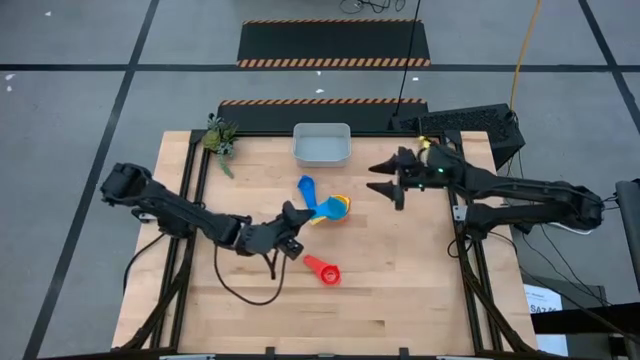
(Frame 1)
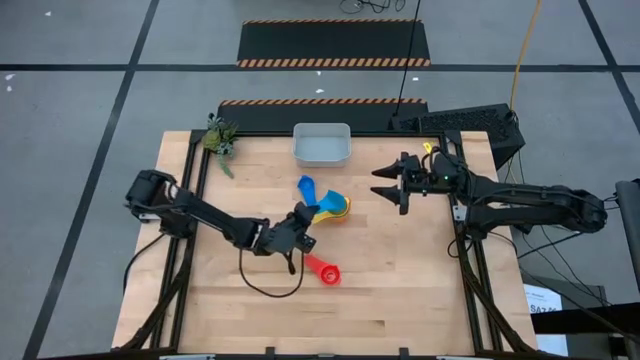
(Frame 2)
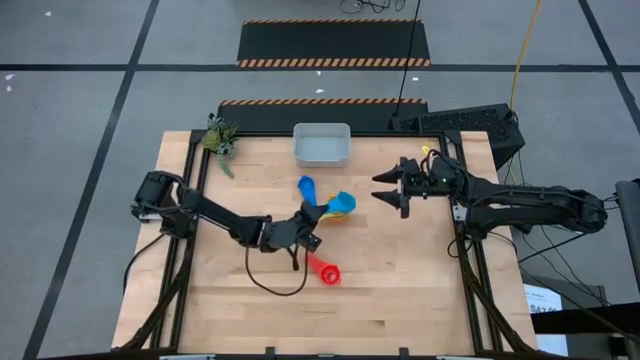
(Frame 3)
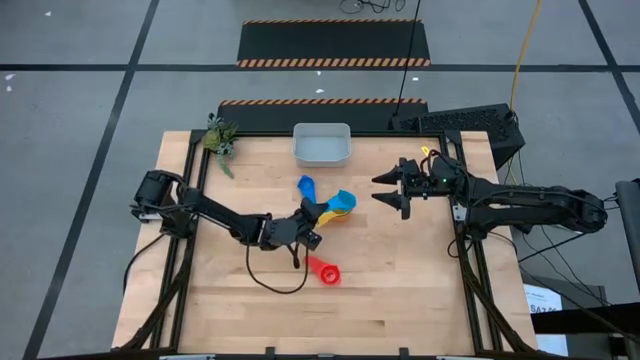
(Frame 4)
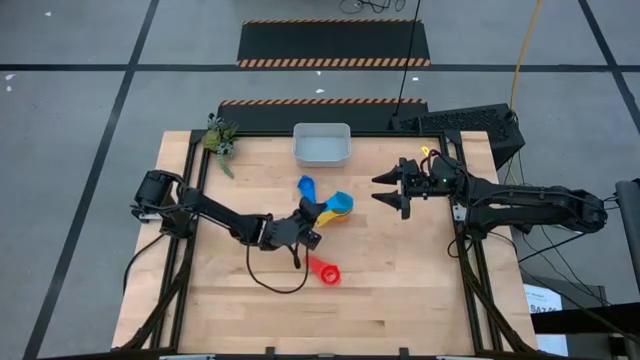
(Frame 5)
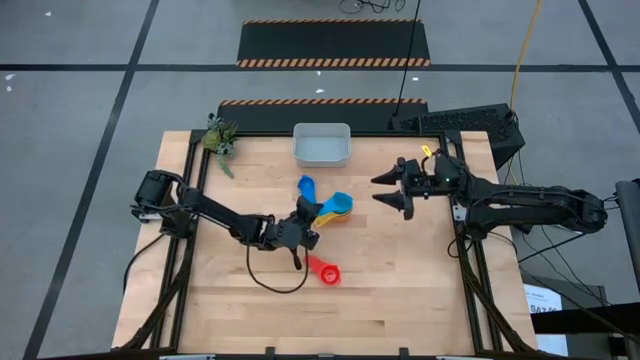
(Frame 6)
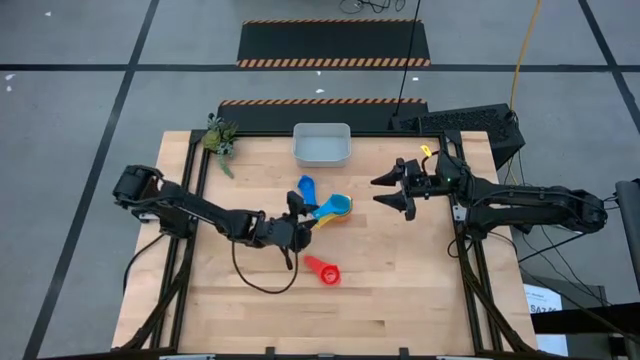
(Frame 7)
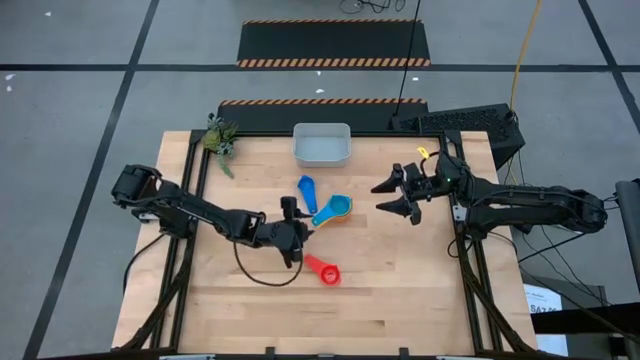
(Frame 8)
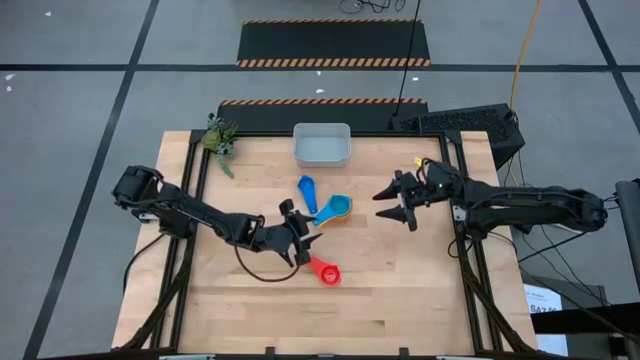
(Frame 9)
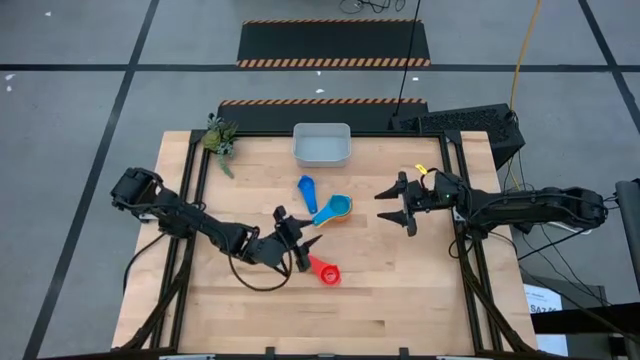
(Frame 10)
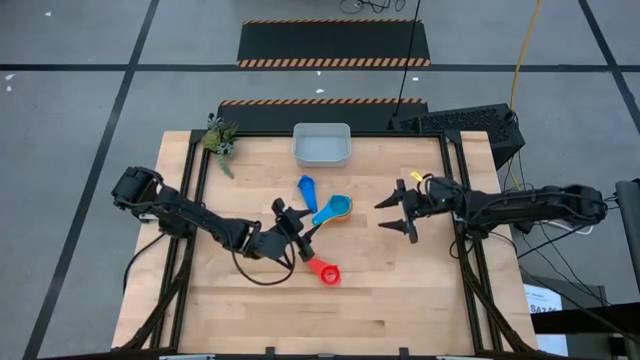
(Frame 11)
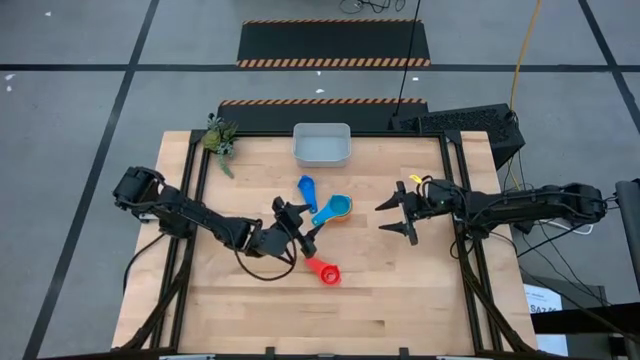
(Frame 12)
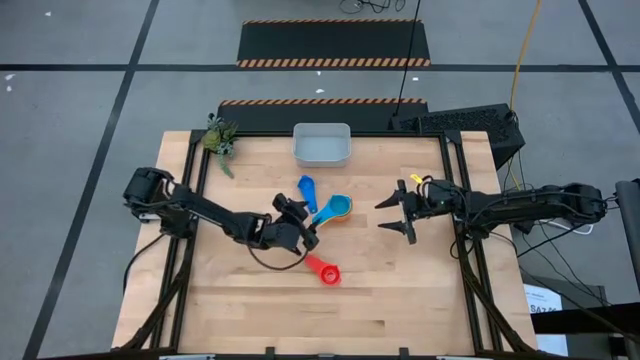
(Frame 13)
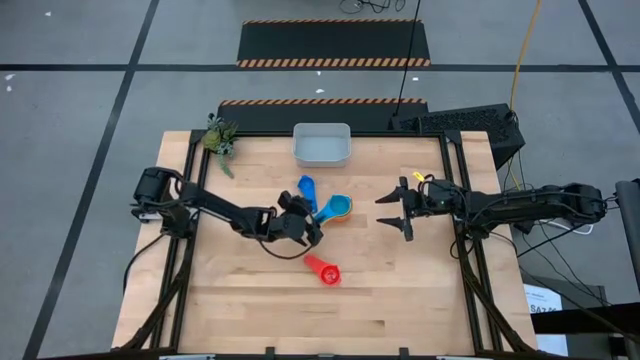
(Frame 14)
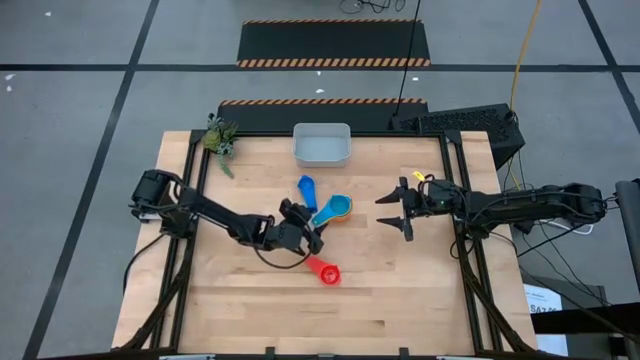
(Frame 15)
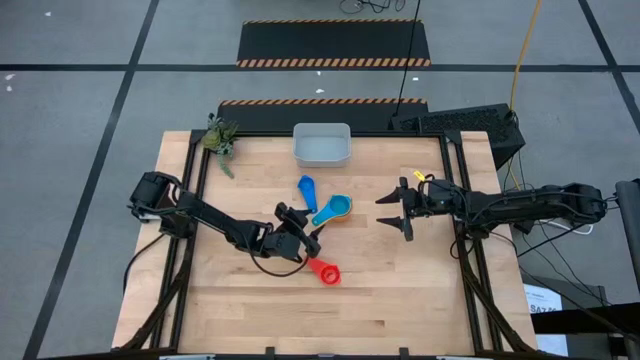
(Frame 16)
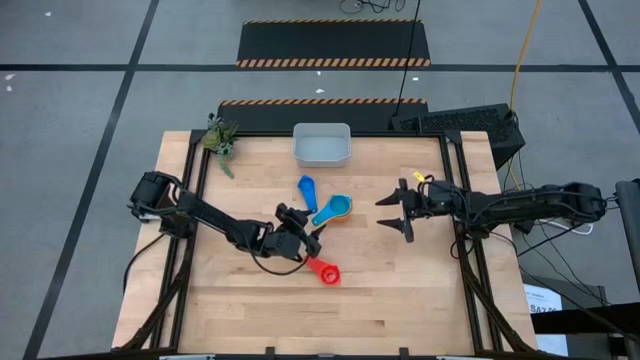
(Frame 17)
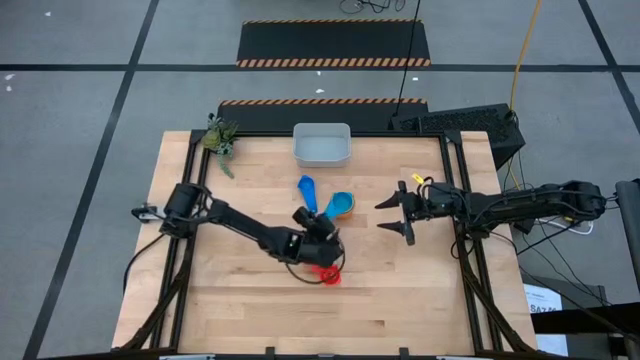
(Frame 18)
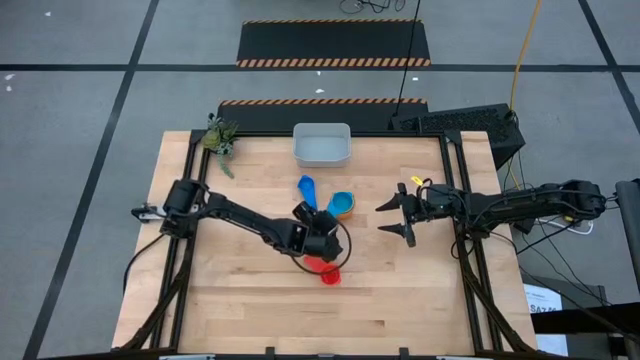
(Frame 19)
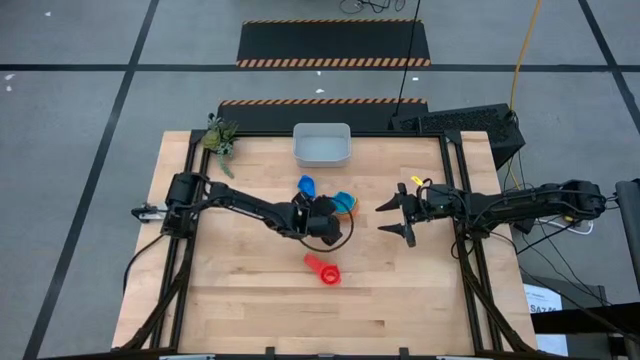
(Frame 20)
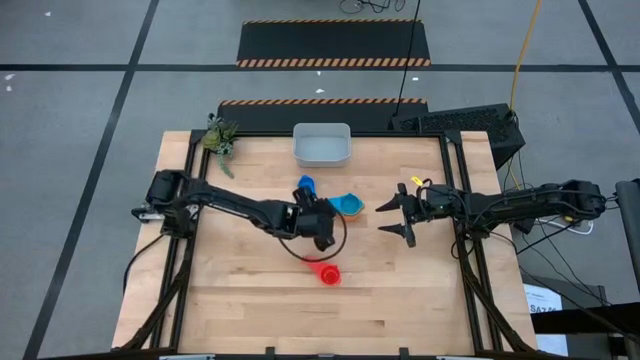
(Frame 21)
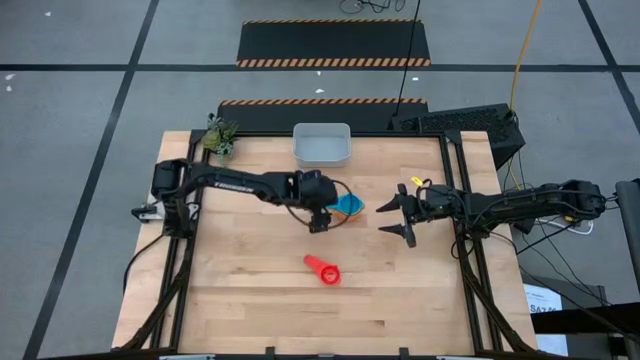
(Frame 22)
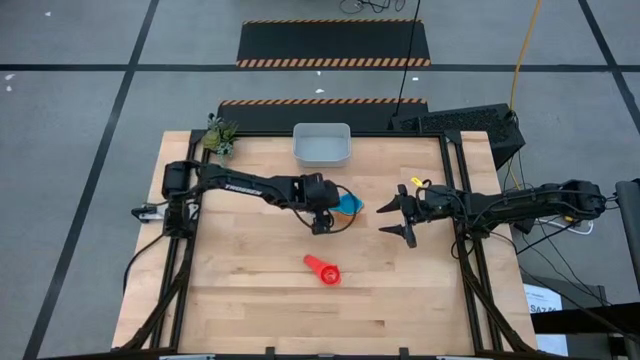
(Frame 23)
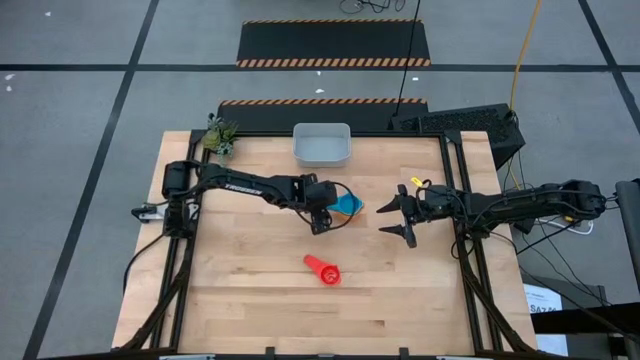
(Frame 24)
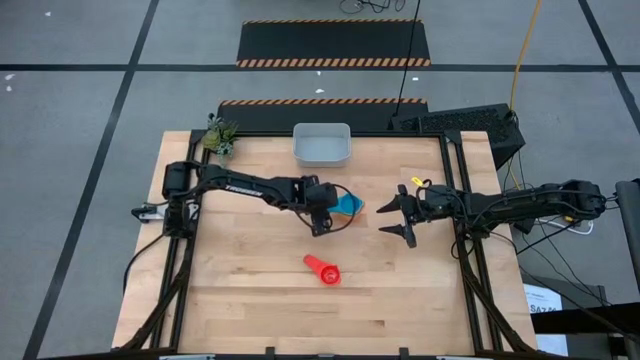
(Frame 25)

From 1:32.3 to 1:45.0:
Task: Nest measuring cups in basket
Stack the light blue measuring cup into the yellow measuring cup

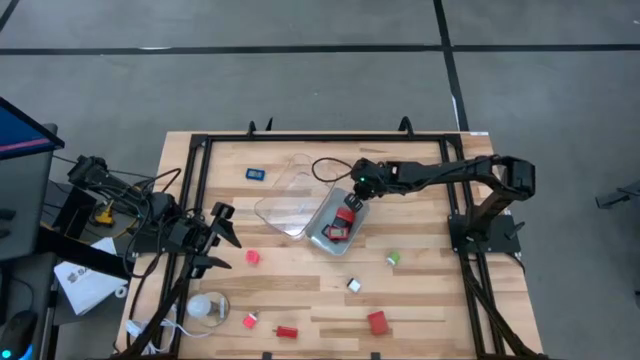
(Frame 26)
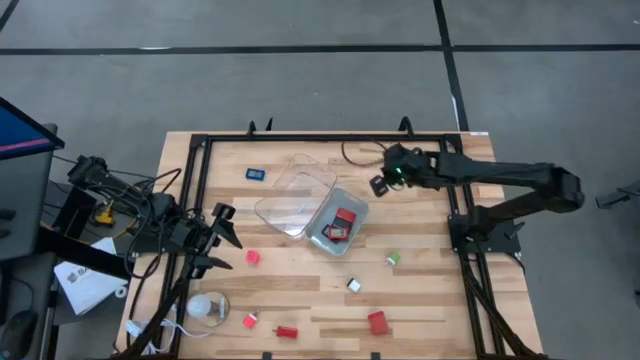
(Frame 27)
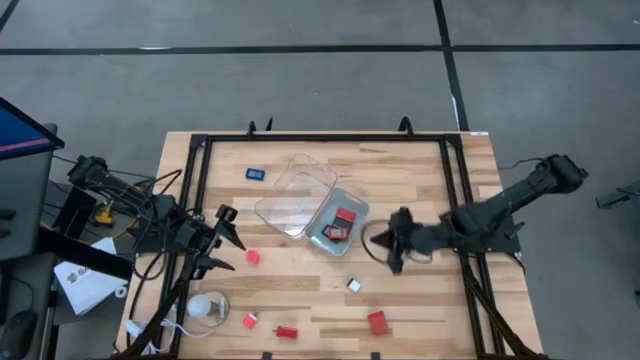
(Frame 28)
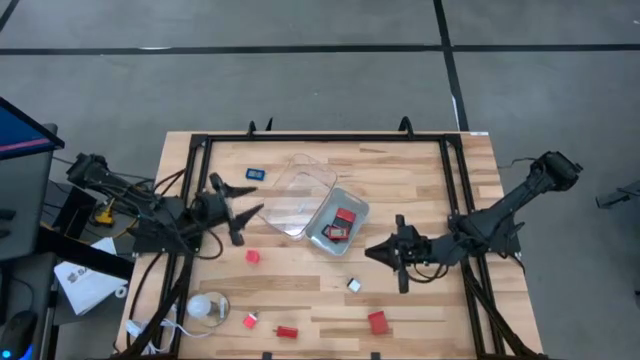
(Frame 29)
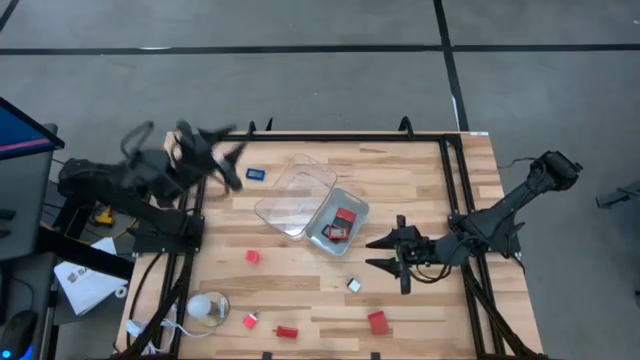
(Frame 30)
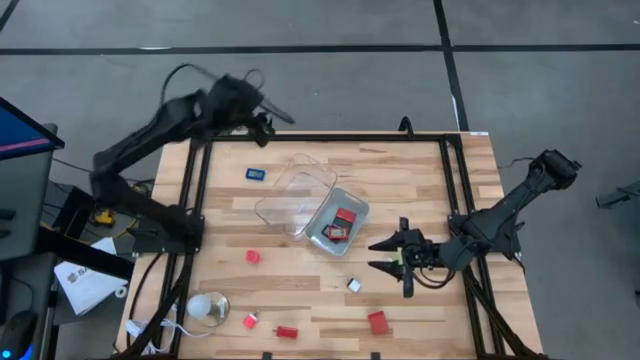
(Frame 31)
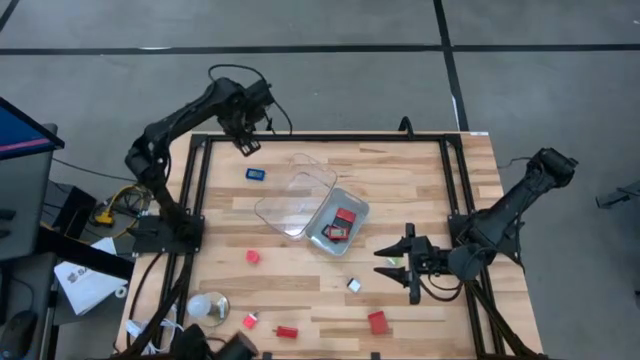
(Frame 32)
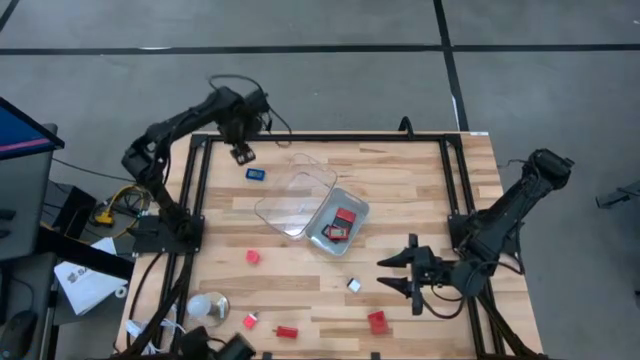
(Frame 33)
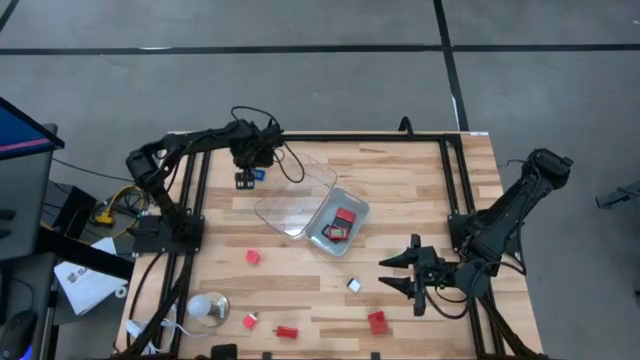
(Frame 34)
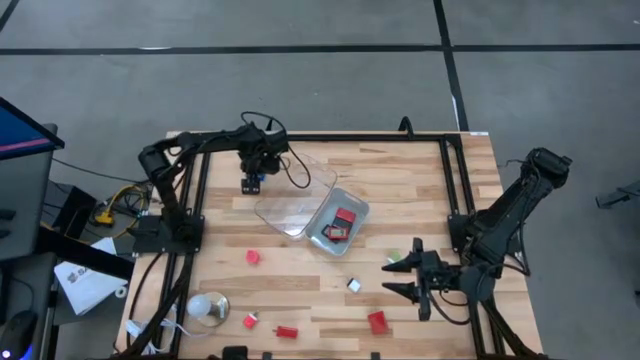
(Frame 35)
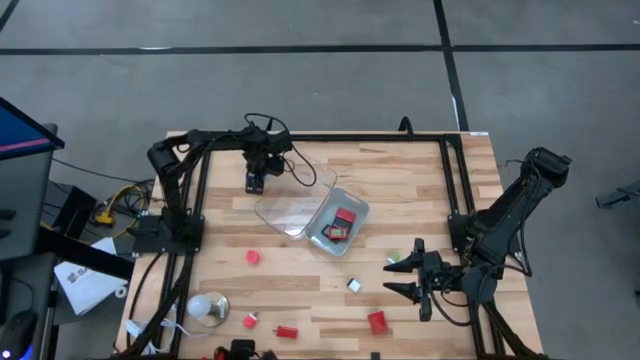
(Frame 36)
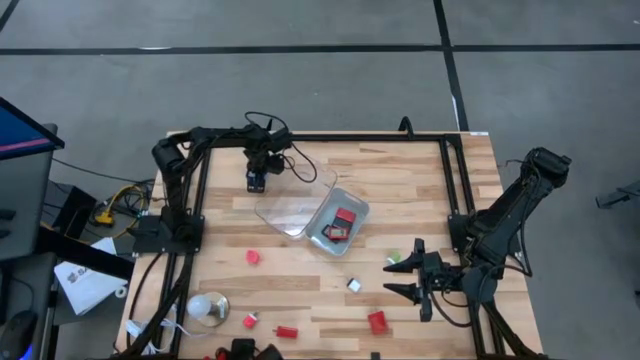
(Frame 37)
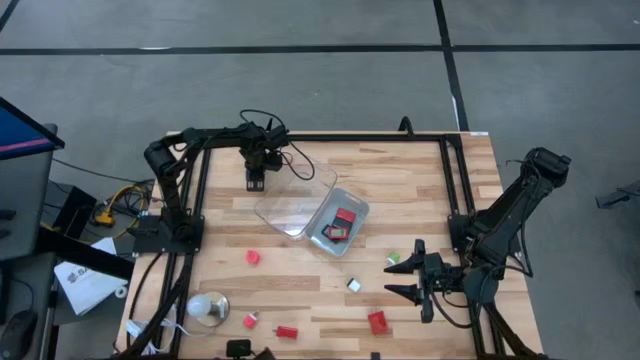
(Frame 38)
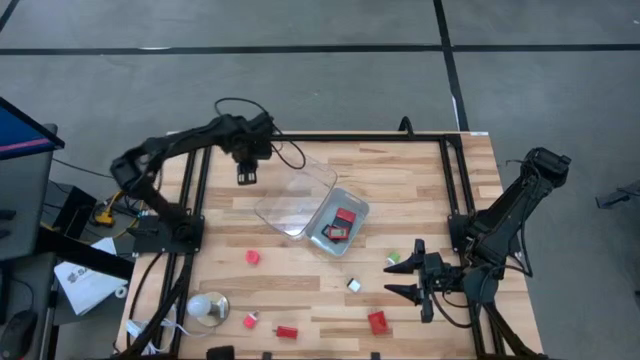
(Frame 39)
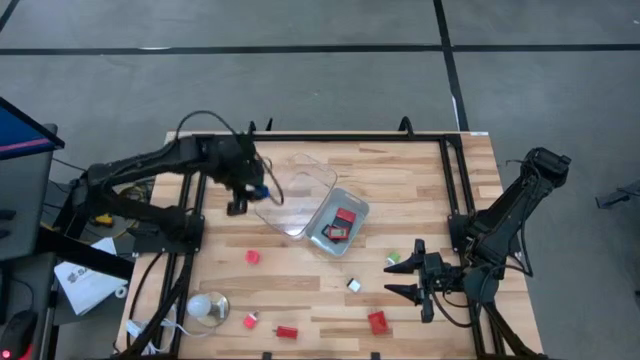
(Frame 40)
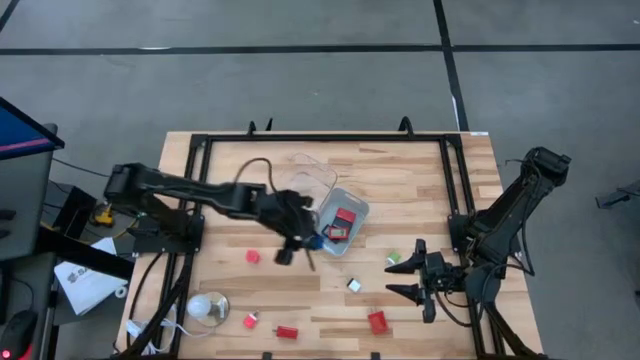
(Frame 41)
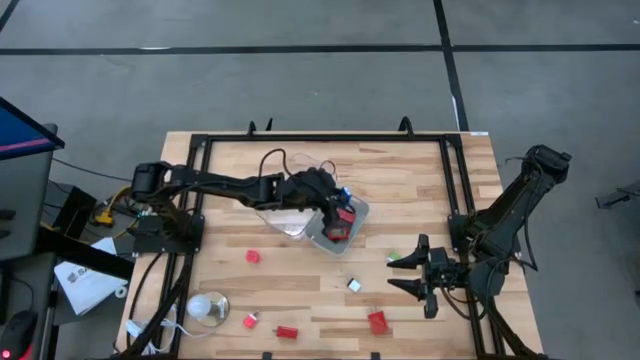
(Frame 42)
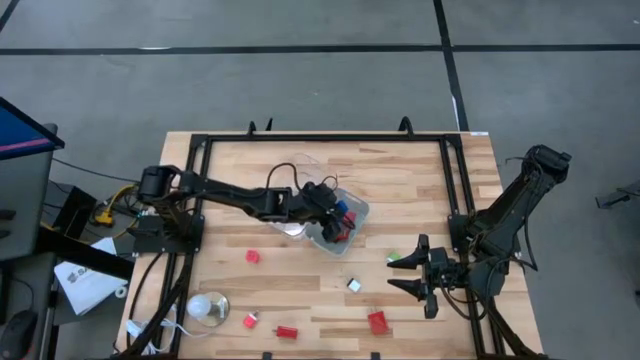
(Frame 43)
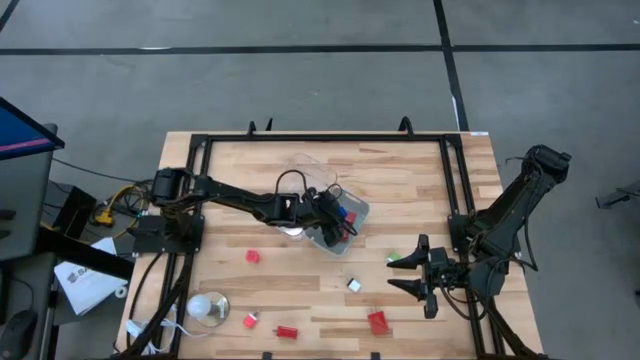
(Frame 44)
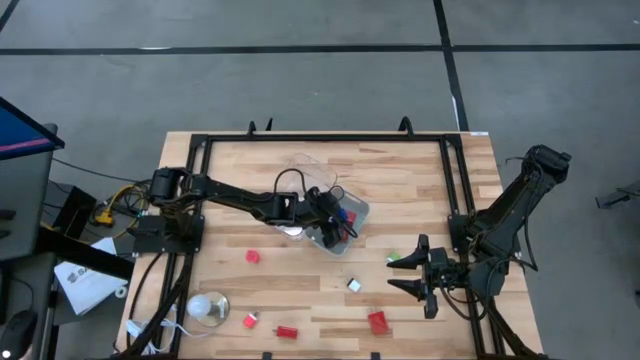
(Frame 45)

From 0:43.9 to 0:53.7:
Task: Pick & Place Office items
Put the blue digital timer into the gray bin
